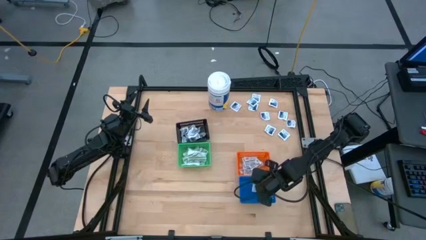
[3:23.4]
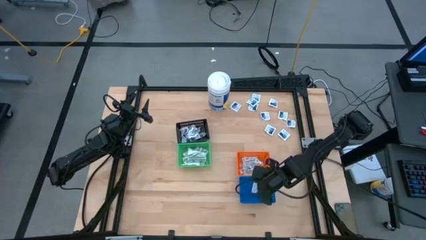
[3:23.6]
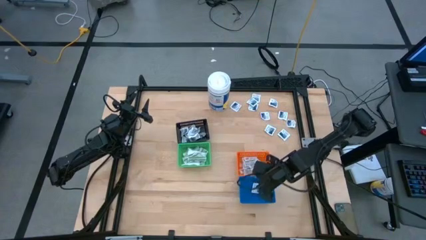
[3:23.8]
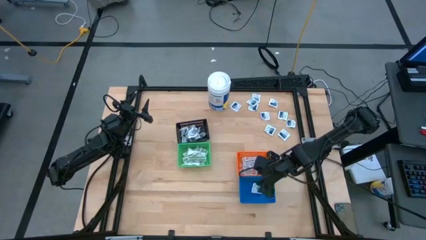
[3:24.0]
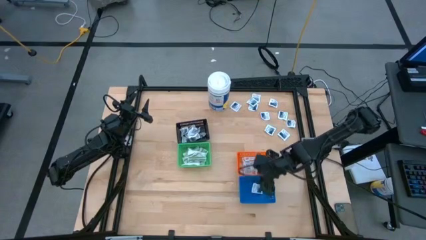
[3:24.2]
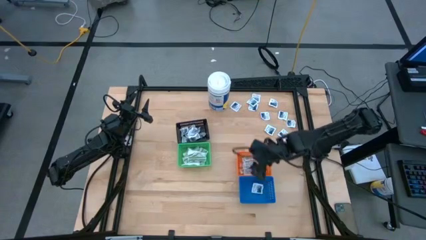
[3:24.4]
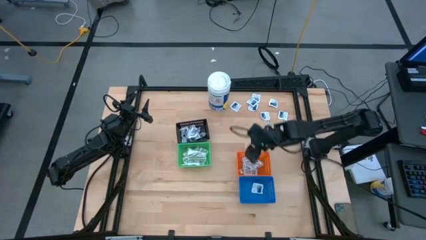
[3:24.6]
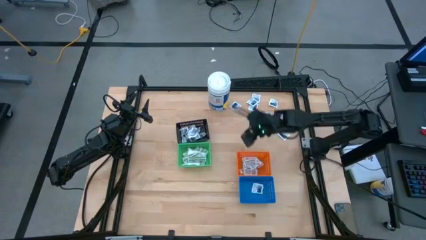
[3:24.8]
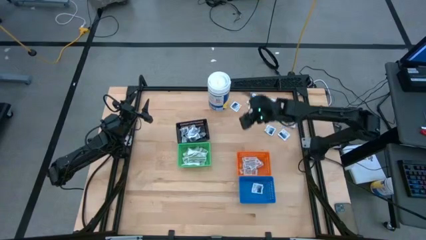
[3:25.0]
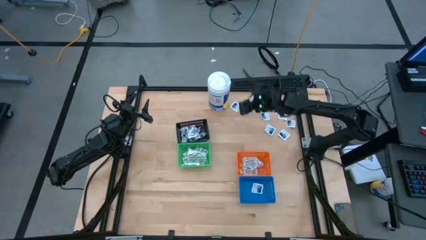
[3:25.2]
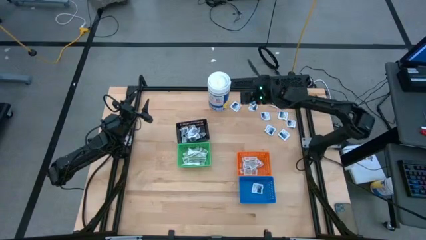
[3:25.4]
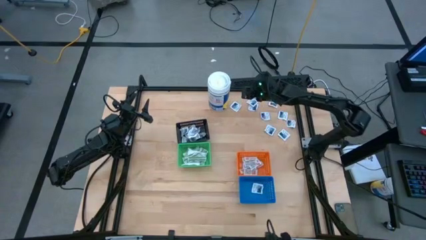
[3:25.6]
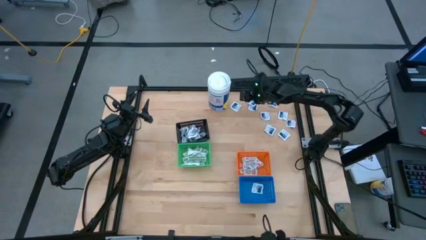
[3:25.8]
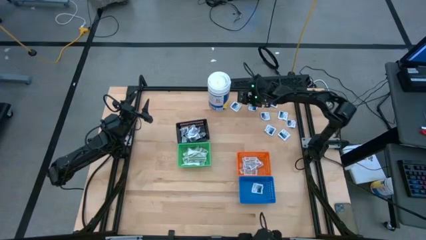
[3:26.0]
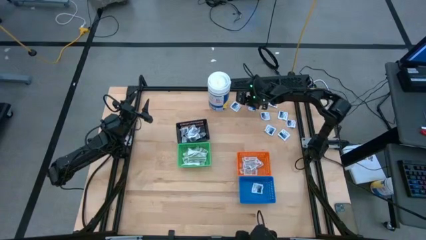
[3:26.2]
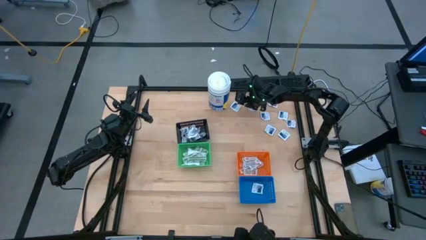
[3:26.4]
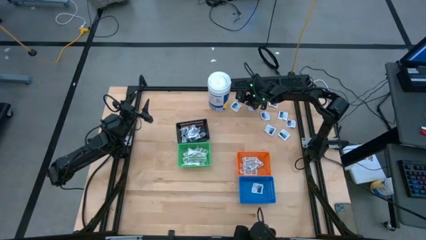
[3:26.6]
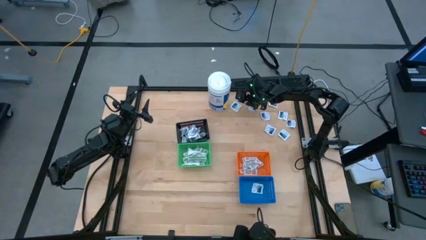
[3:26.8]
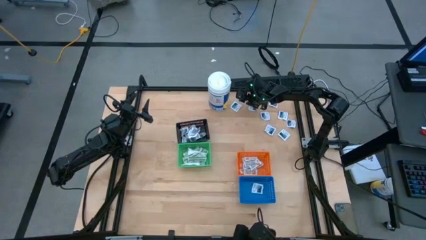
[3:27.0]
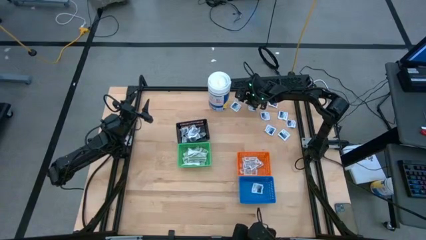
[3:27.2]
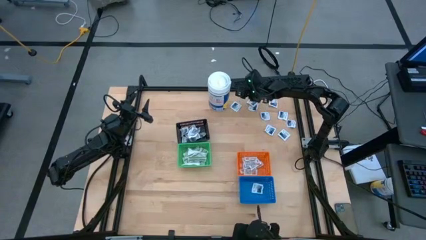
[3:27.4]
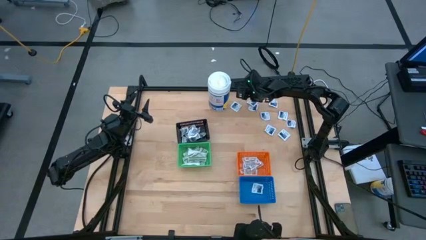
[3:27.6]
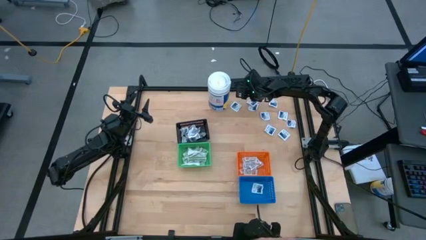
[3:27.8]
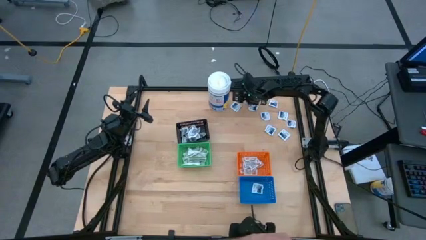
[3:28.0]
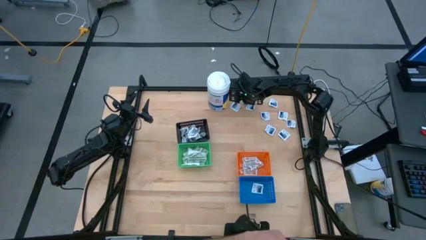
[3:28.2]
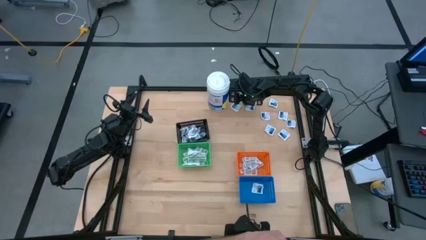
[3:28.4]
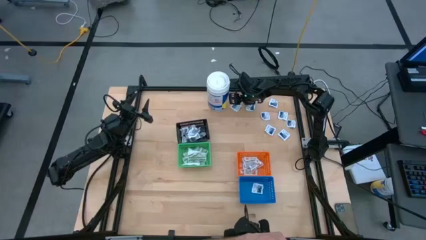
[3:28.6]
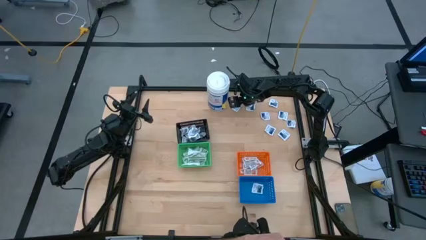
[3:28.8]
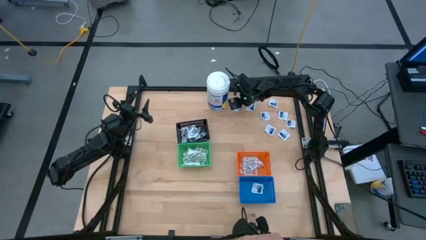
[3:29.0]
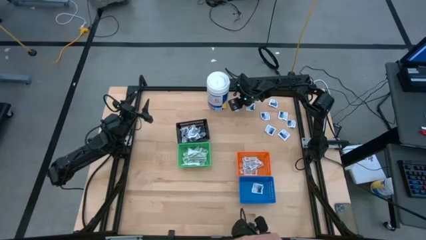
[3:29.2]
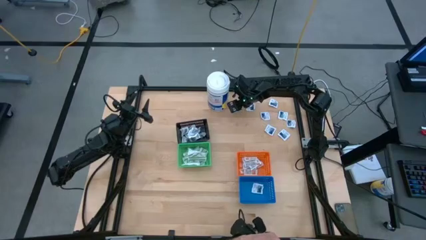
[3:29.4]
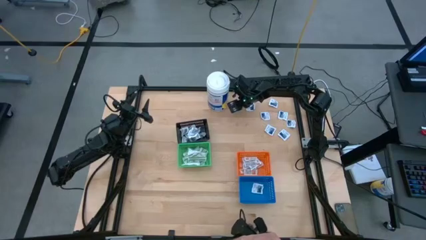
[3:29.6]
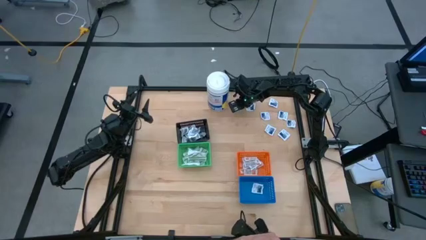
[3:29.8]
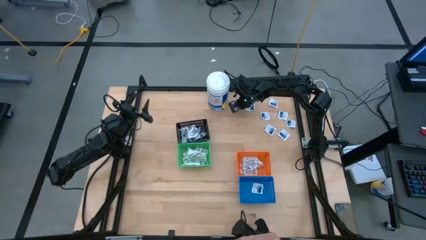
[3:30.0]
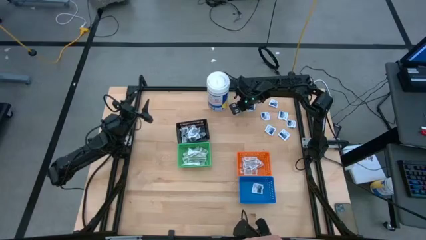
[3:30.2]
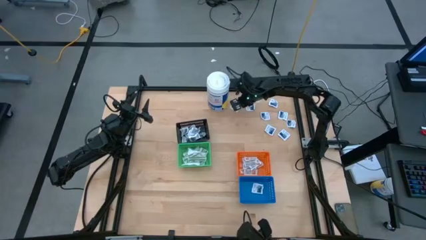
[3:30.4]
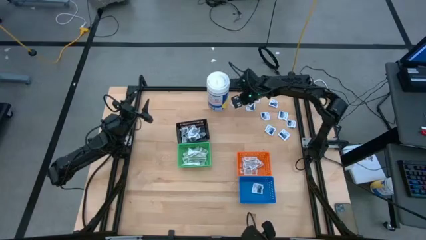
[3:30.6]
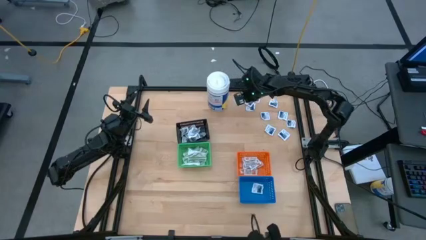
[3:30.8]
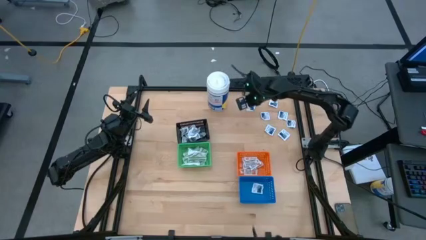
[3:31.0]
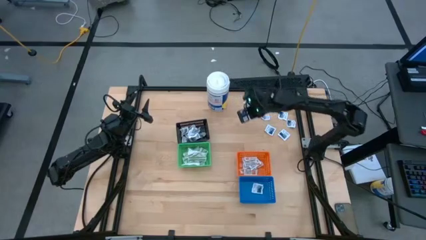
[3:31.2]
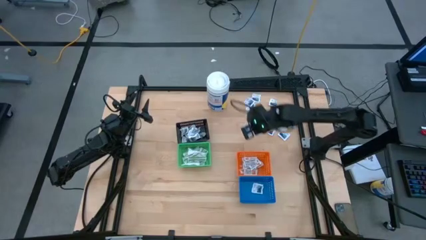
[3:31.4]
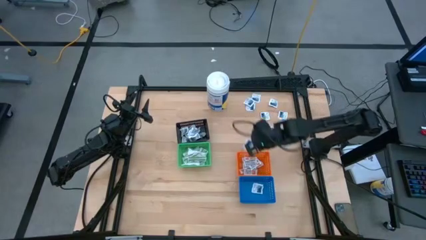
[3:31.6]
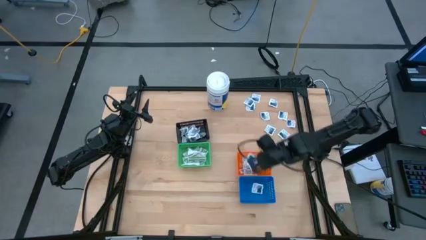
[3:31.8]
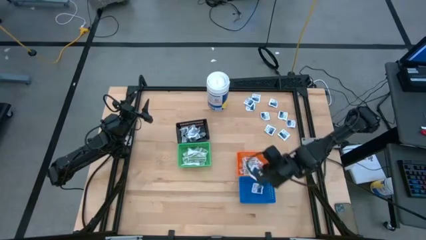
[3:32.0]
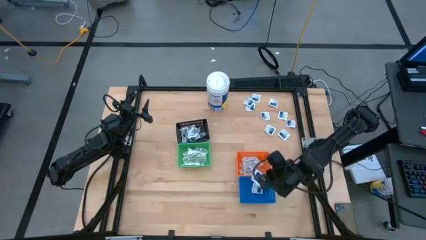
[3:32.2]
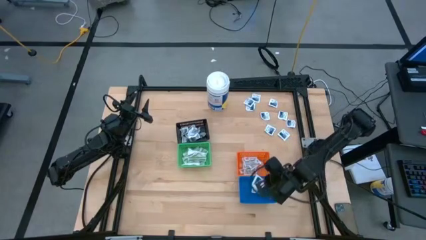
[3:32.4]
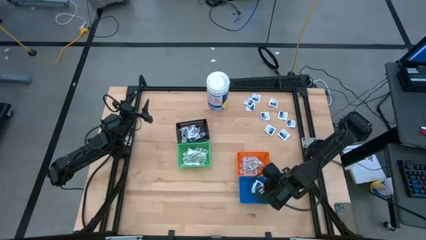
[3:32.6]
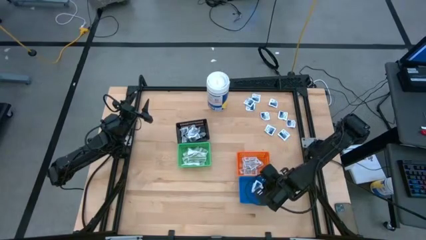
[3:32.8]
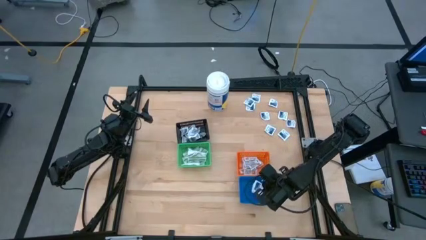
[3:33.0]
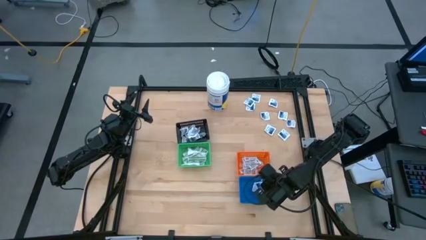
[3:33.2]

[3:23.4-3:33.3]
Task: Pick & Place First Aid Supplies
Put the blue pad into the blue bin

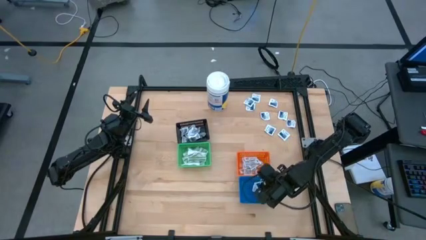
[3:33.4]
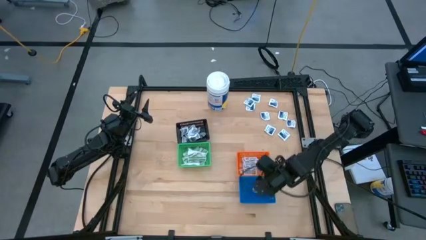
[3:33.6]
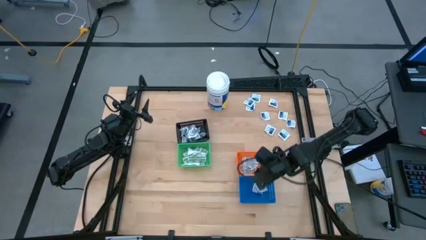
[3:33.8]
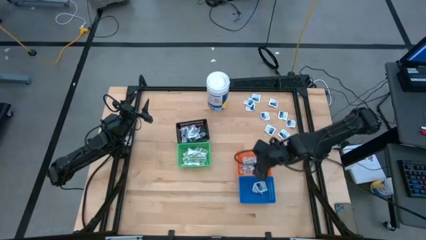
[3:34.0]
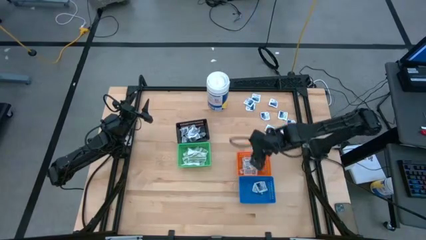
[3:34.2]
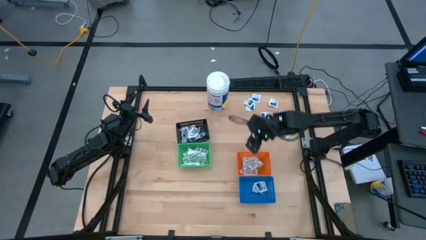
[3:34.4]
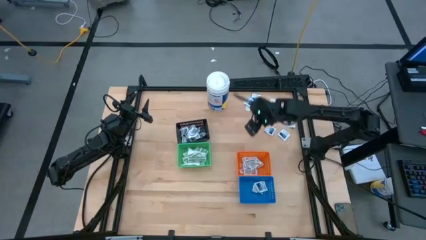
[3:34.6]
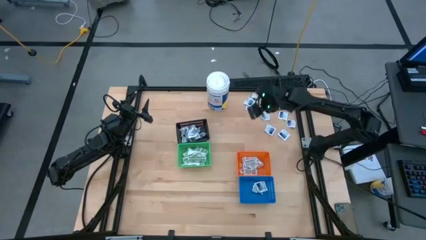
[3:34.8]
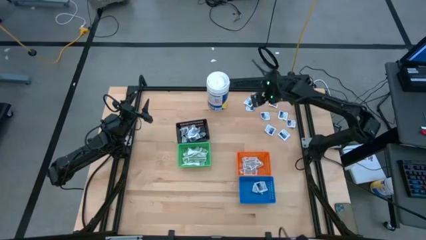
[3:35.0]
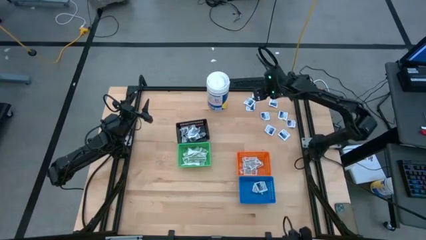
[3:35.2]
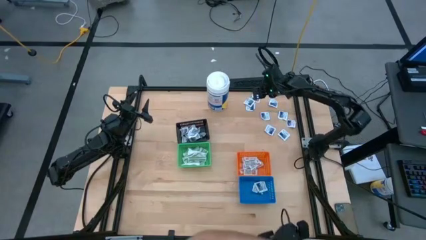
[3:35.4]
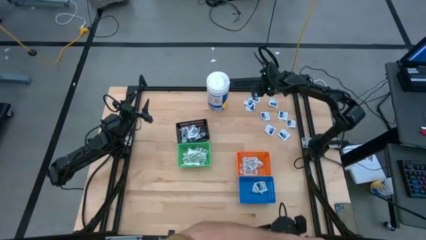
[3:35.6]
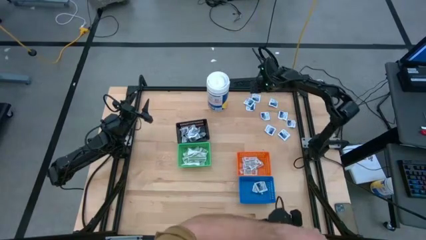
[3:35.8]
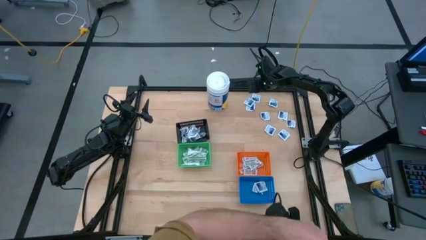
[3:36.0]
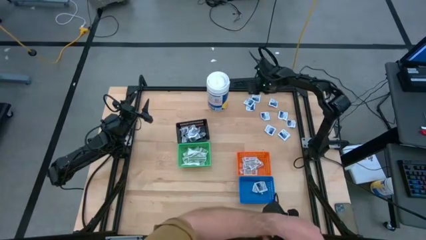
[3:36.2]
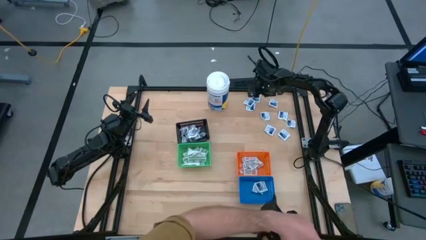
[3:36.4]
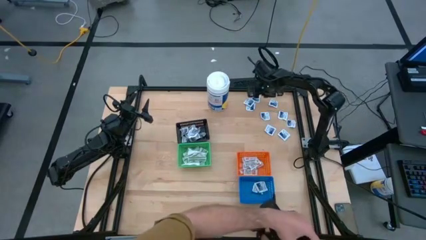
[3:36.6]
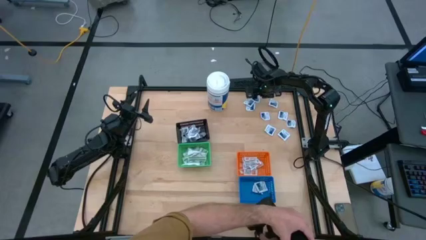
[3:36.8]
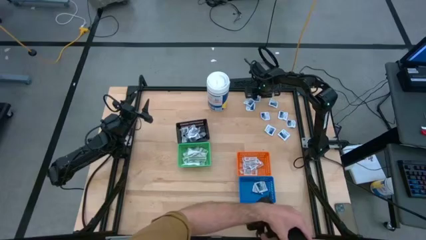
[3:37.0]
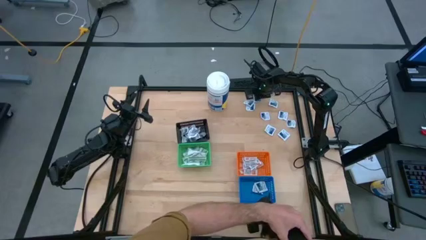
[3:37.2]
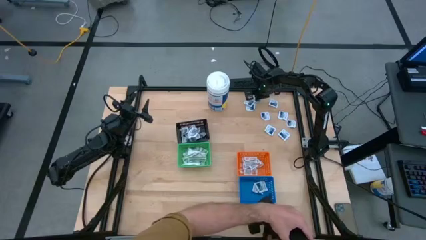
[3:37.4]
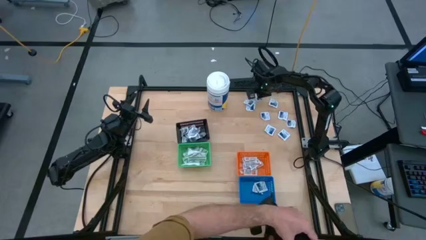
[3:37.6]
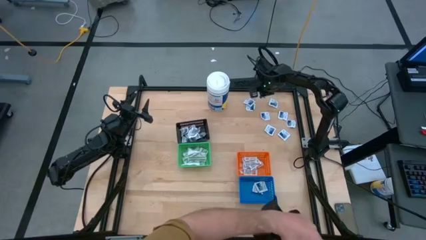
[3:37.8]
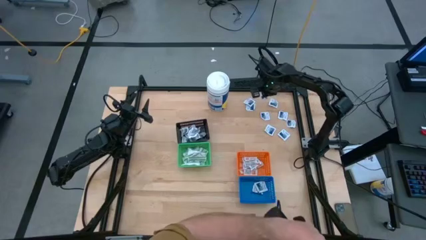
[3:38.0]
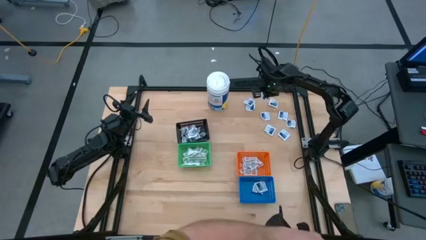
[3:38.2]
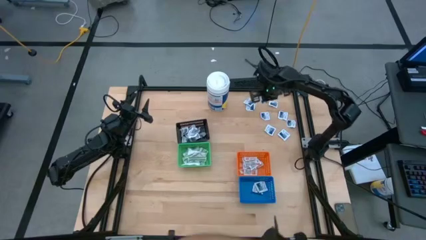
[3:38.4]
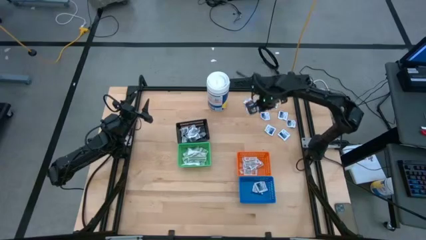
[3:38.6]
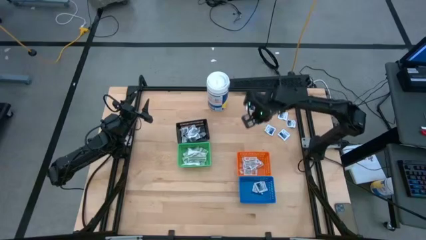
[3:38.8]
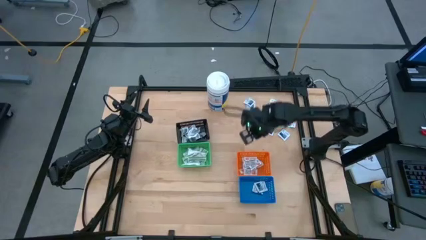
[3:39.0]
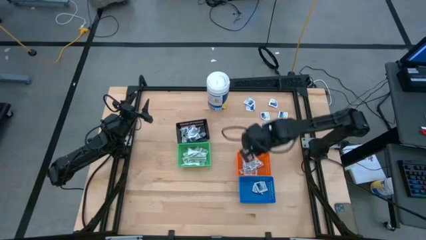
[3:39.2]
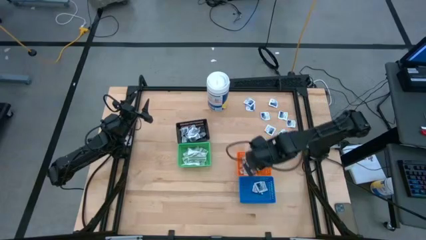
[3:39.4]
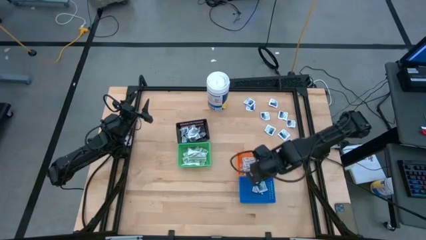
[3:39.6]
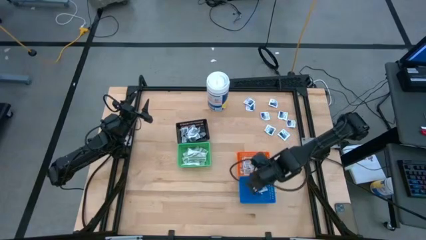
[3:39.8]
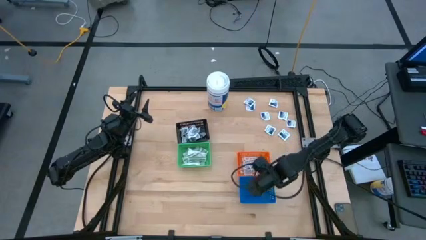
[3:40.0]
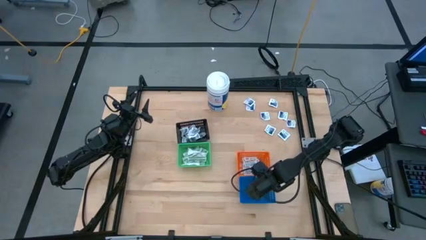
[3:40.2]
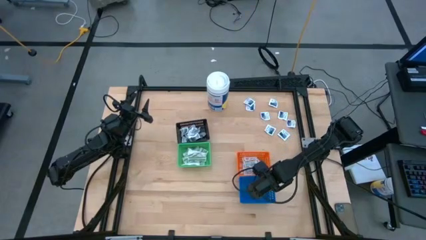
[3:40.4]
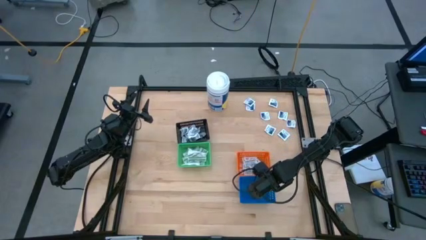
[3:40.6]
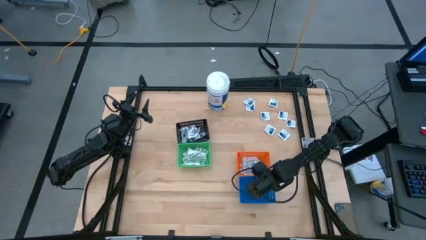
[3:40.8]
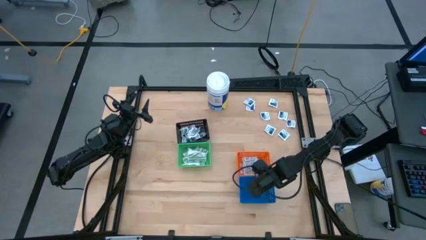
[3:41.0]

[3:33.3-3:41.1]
Put the blue pad into the blue bin
